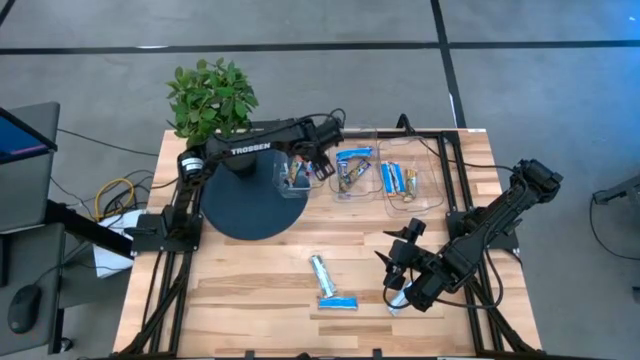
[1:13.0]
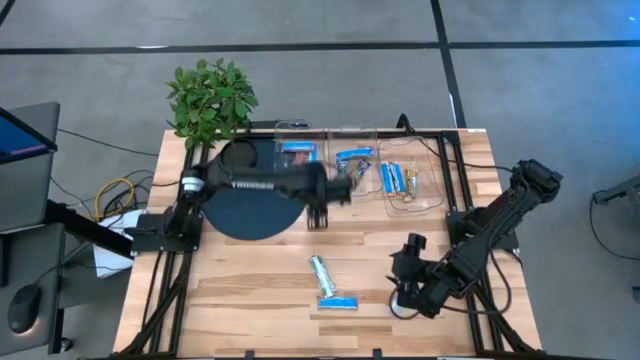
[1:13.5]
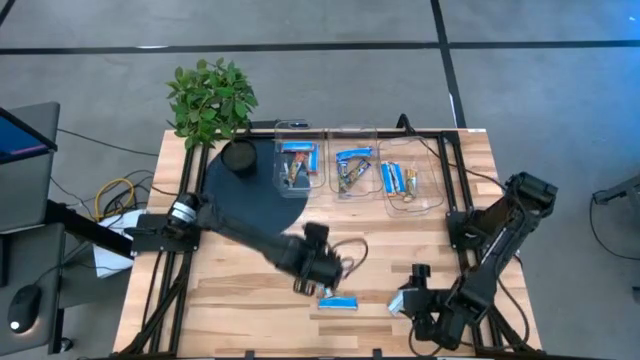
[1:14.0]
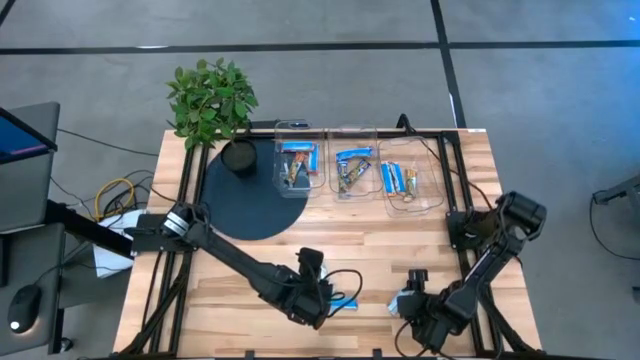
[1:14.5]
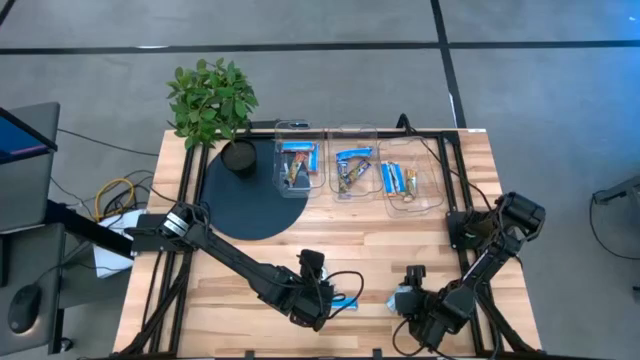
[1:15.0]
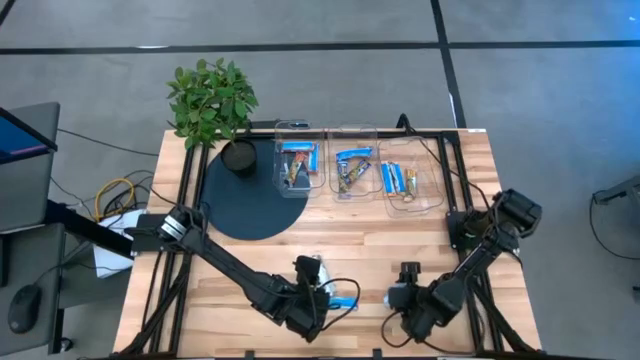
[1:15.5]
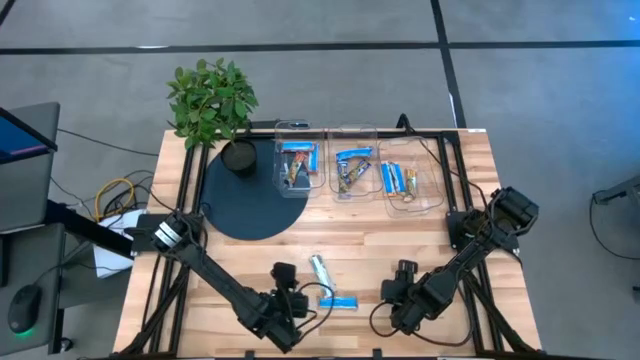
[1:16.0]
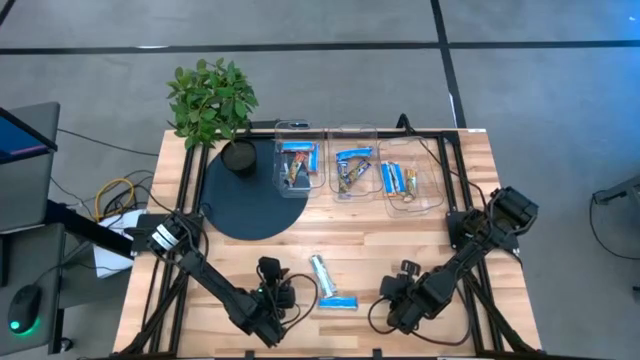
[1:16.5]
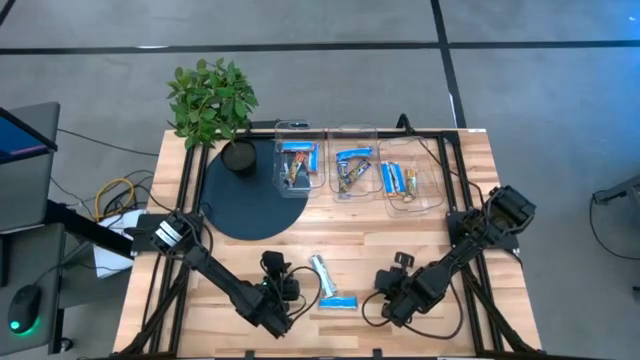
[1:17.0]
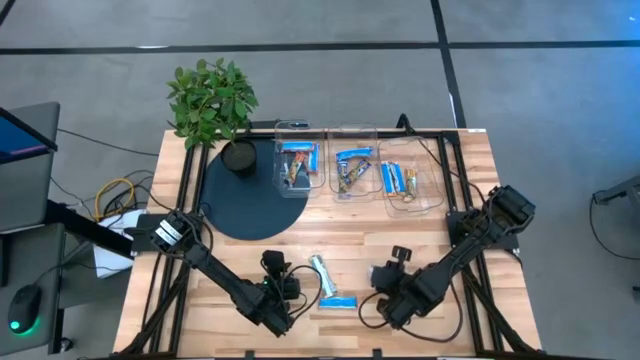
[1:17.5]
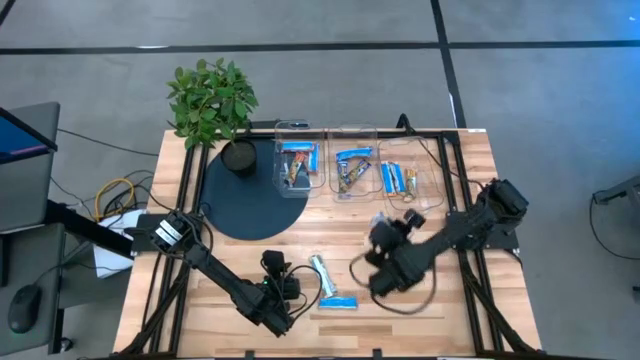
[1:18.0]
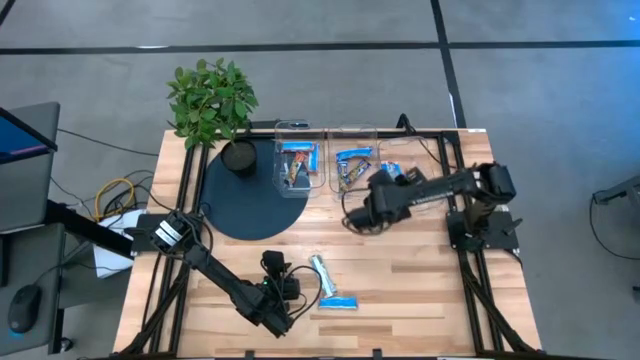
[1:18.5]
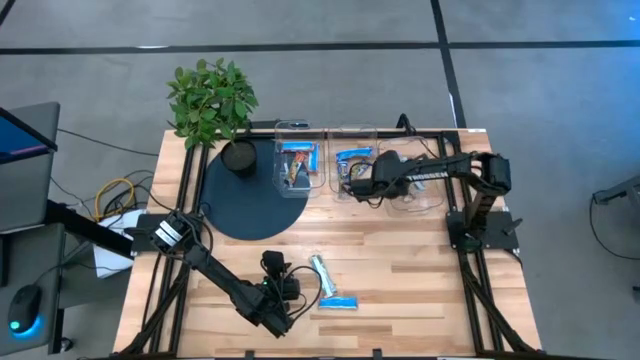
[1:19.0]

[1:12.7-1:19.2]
Task: Pick and place Granola Bars by type
Put the yellow granola bar into the right transparent bin

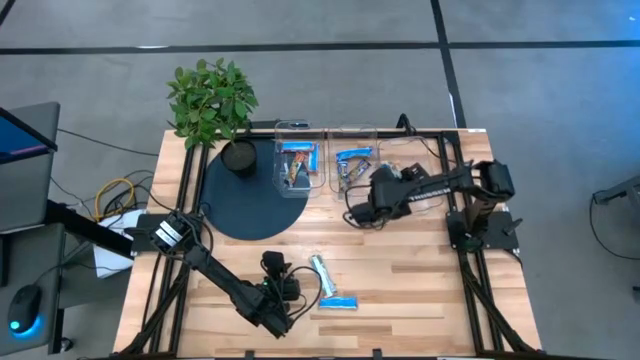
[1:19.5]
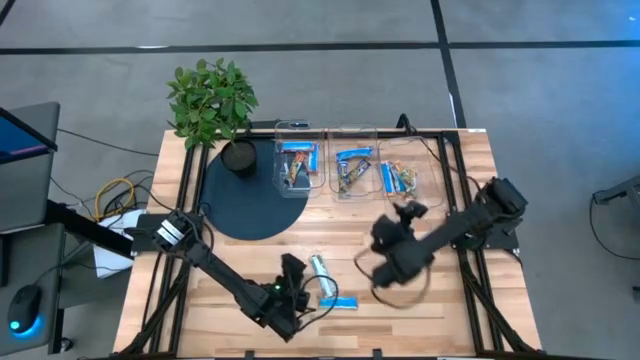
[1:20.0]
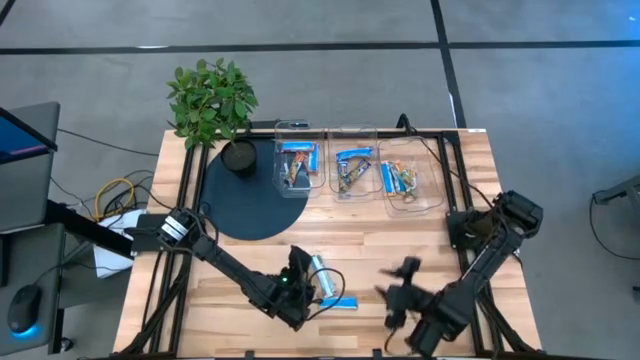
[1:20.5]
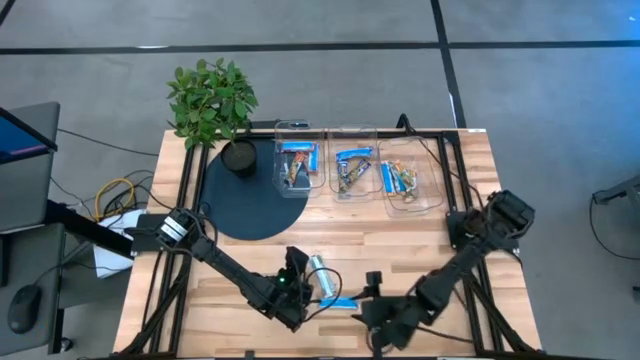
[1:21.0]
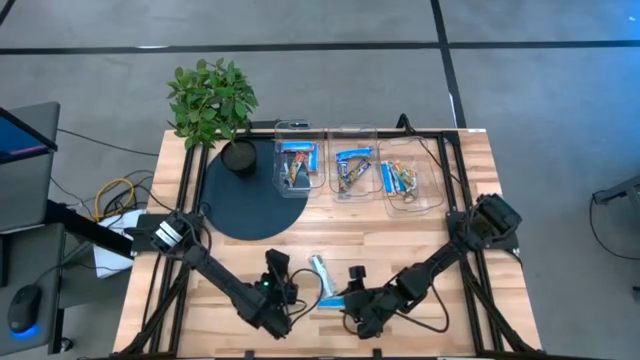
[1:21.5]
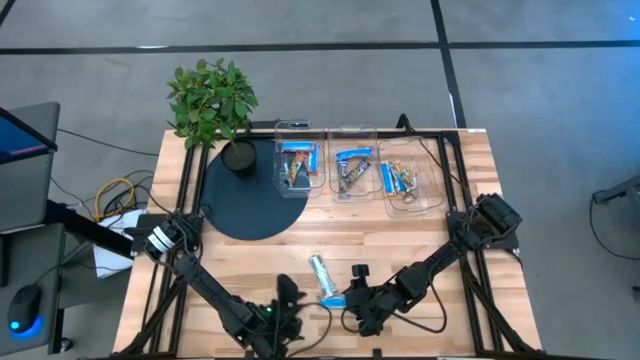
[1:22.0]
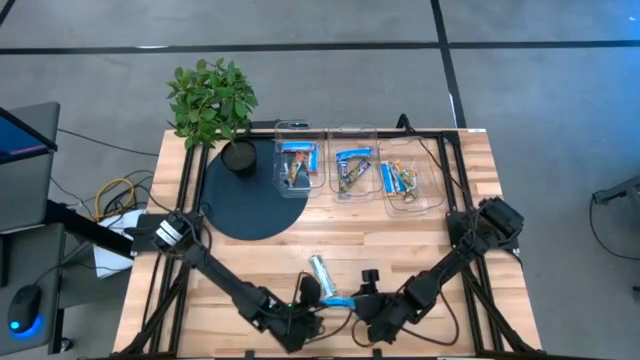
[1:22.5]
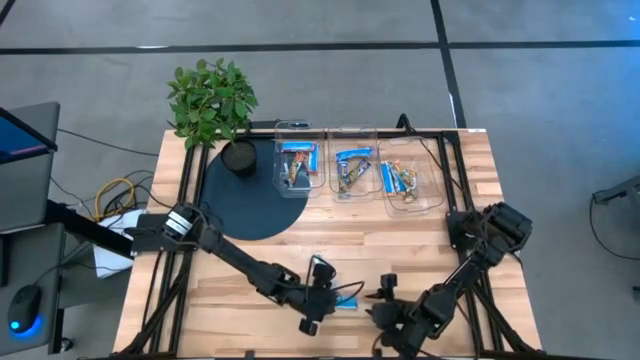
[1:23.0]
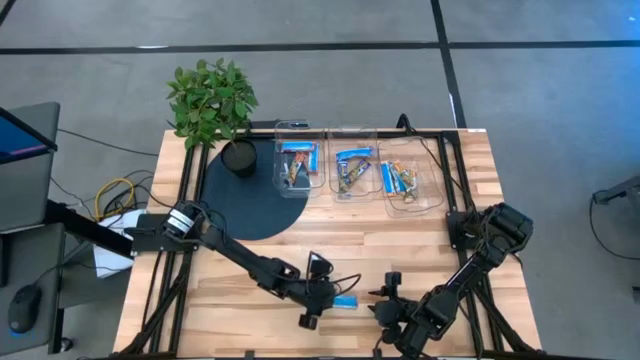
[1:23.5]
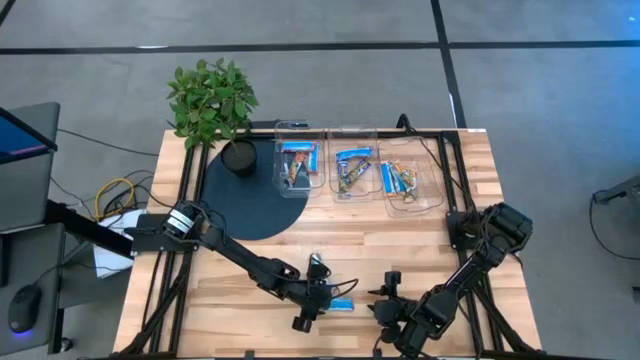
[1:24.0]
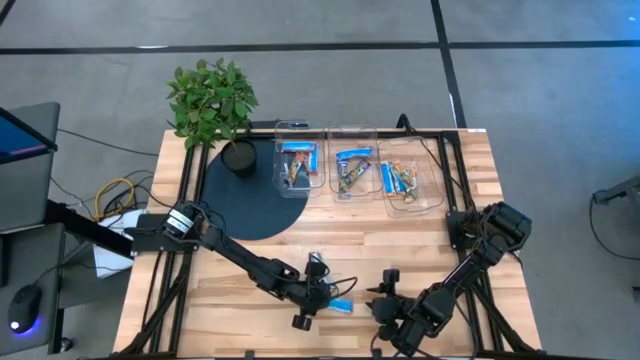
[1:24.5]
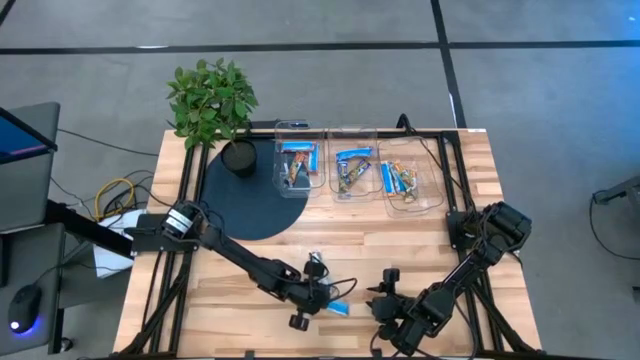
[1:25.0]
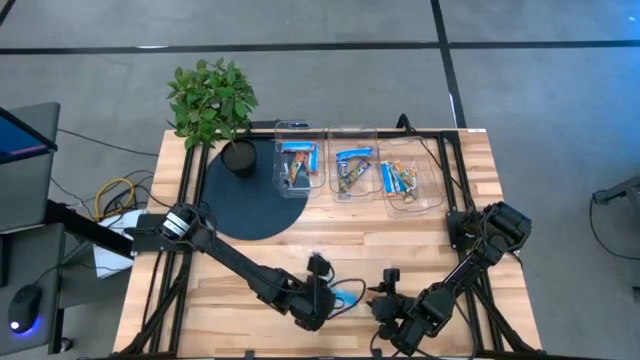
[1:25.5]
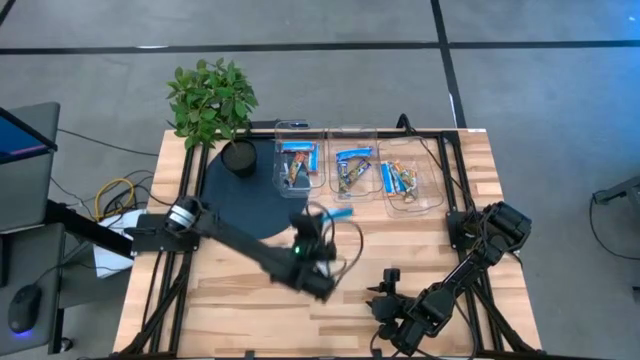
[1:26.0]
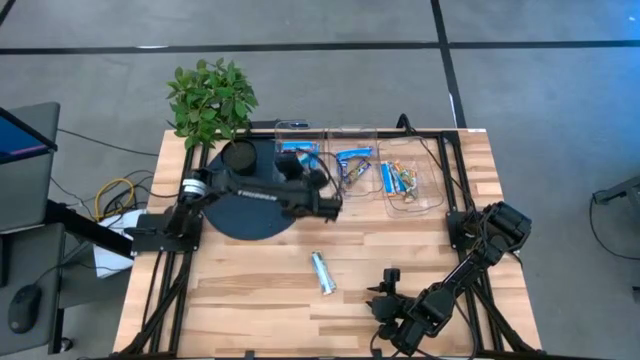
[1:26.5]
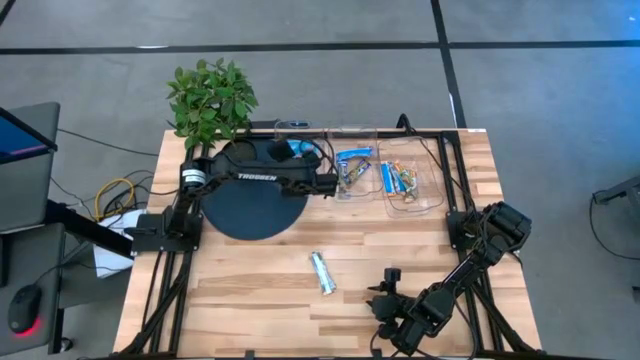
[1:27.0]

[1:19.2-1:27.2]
Put the red granola bar into the left transparent bin

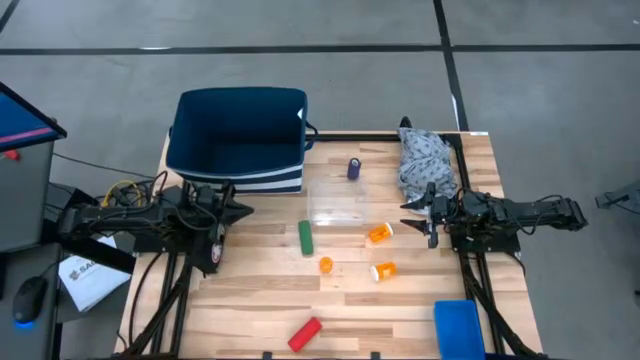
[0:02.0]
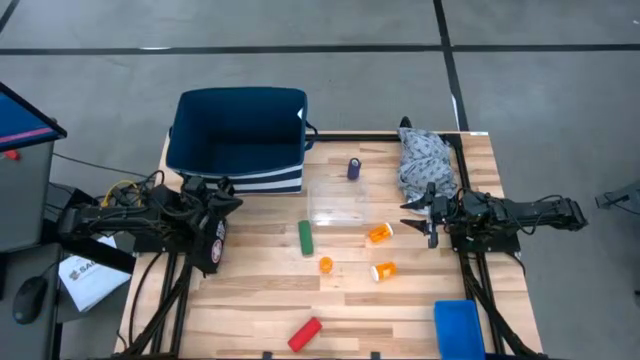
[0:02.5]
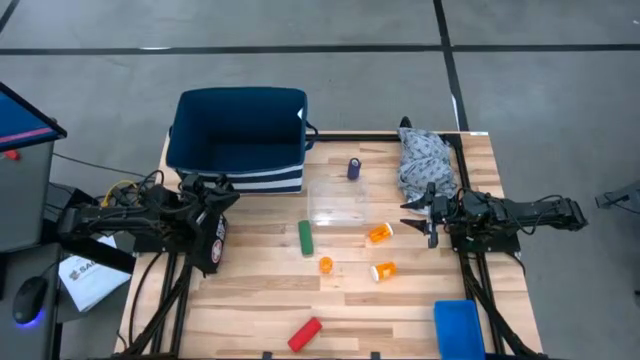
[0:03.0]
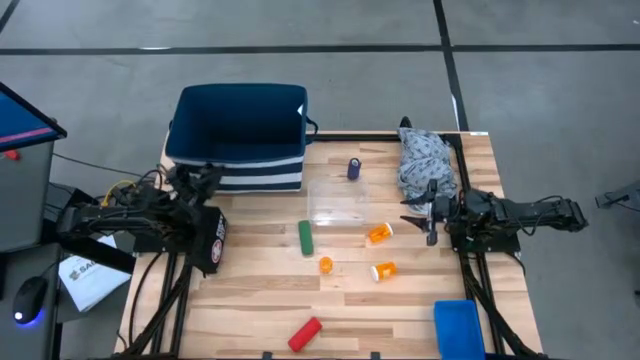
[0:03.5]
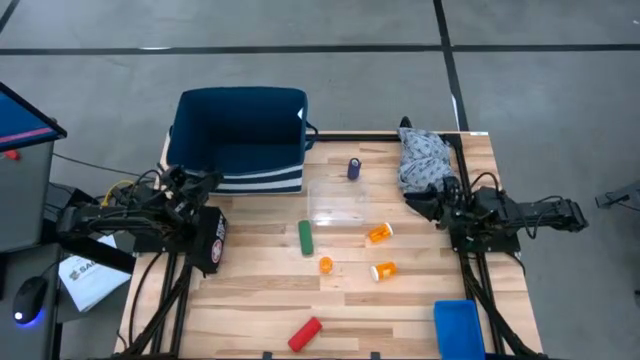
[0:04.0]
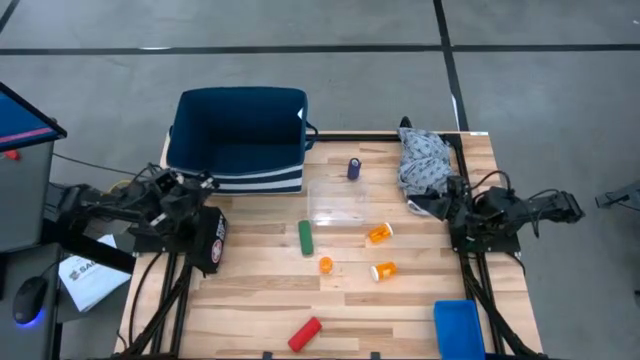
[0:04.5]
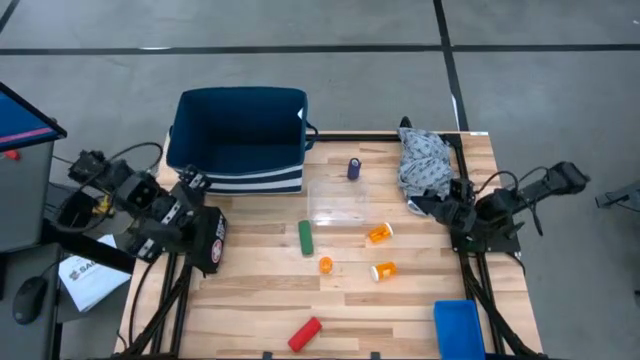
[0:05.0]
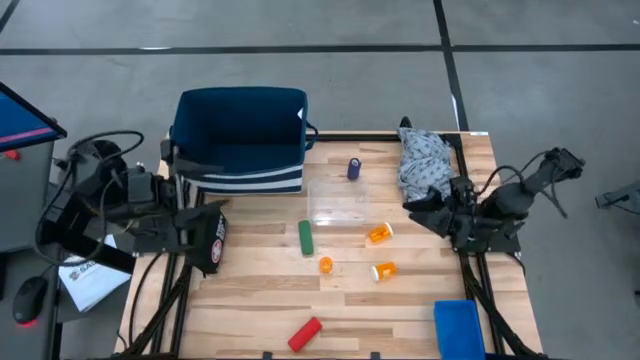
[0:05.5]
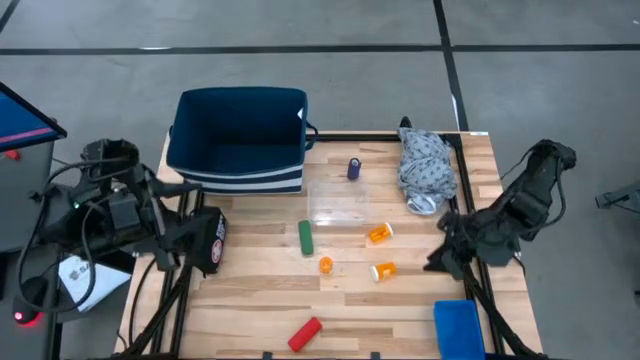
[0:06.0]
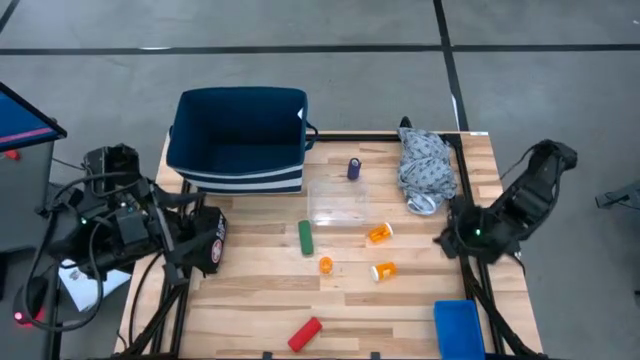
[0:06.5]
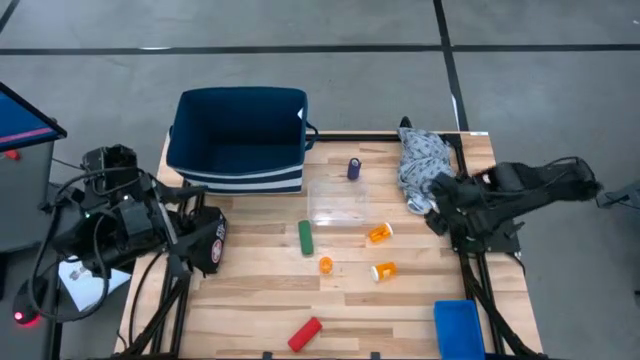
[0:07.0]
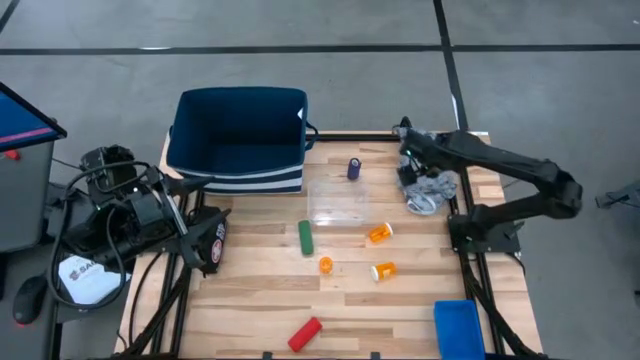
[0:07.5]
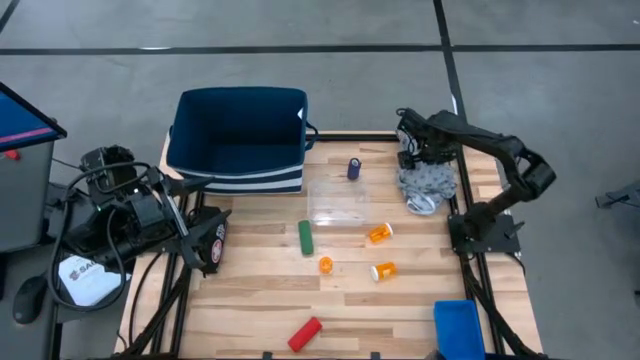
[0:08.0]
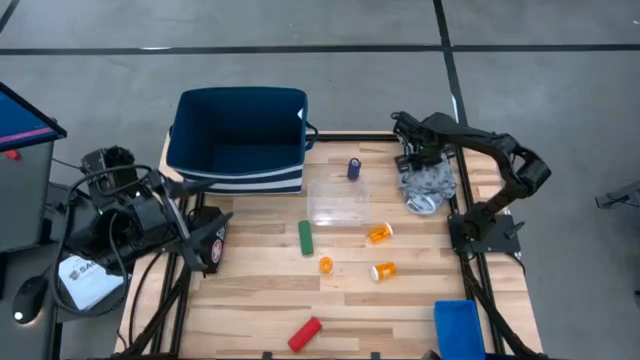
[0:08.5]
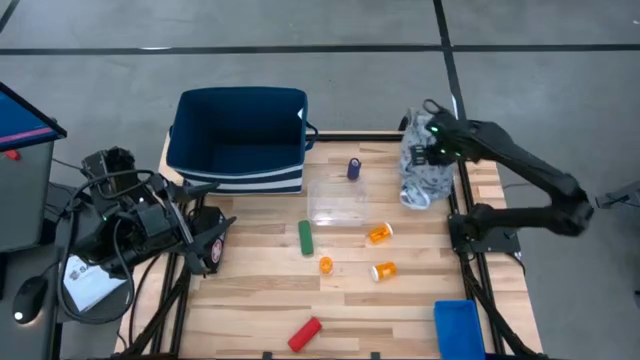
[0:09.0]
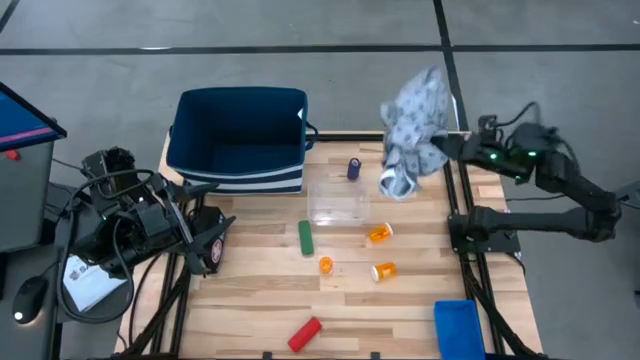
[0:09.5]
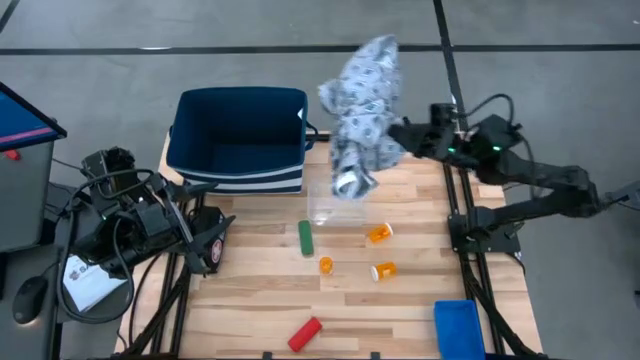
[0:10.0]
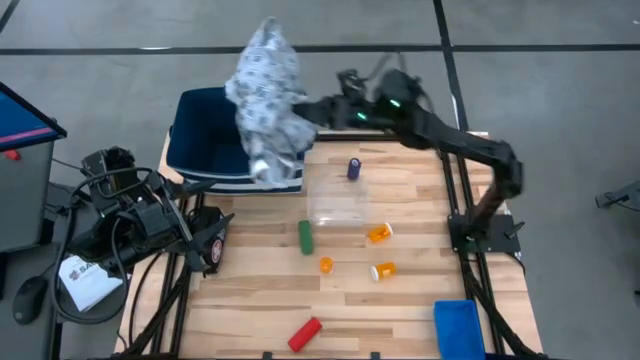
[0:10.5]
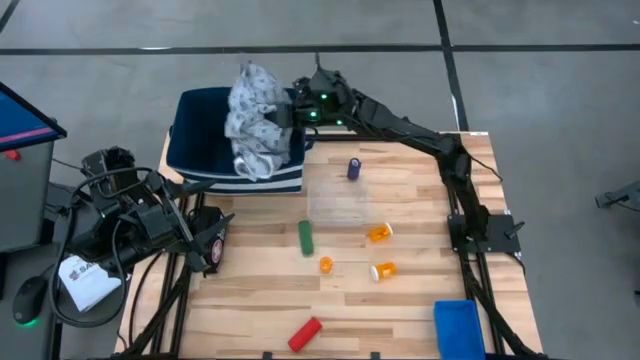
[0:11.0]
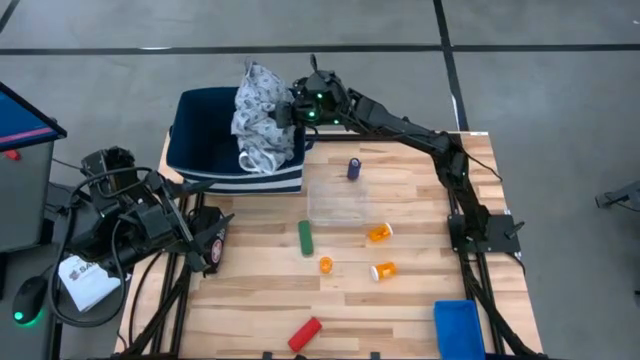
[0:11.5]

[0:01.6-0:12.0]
Task: Pick & place medical supplies in basket/bin
Put the blue patient gown into the blue bin
